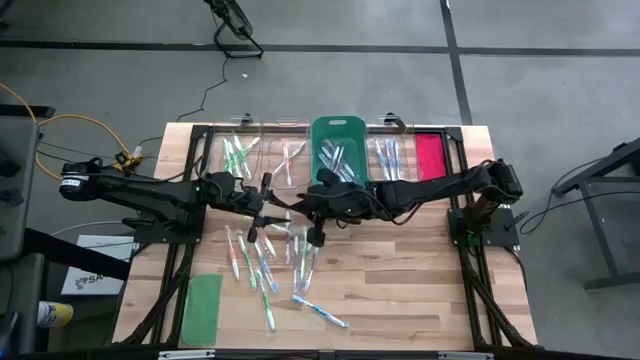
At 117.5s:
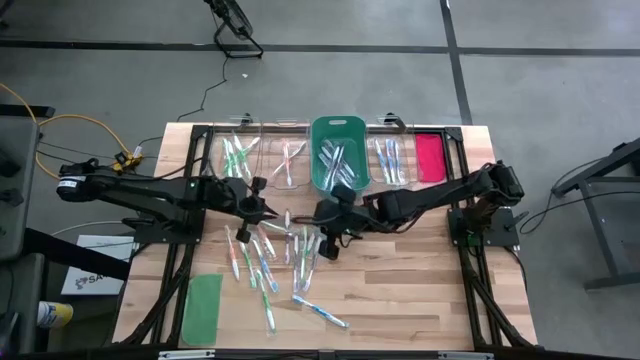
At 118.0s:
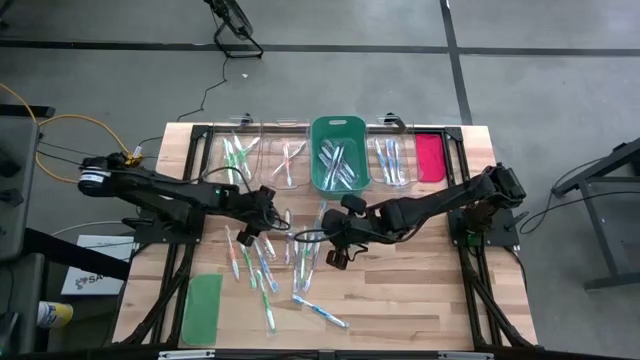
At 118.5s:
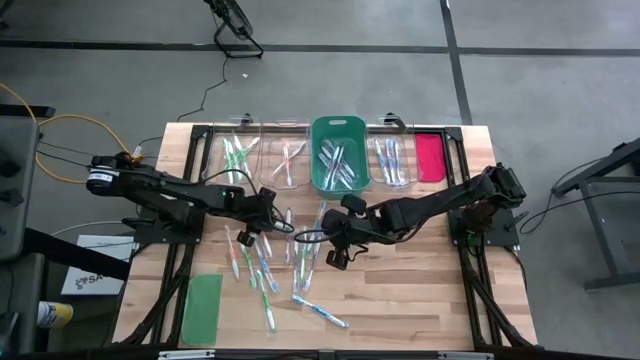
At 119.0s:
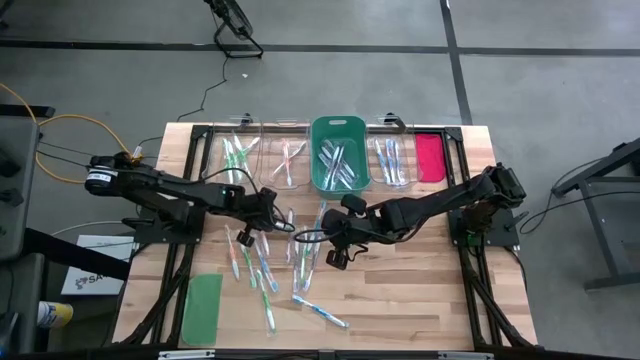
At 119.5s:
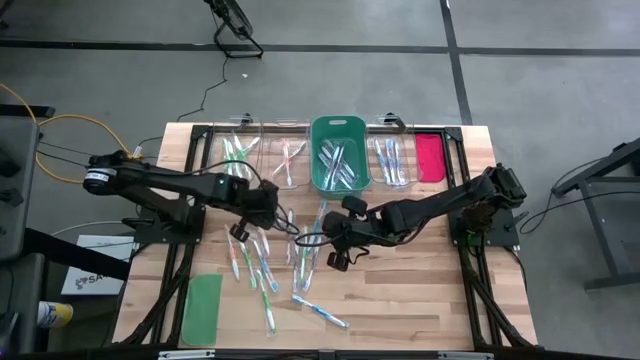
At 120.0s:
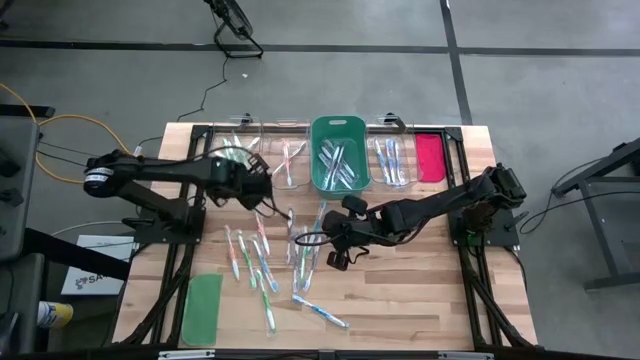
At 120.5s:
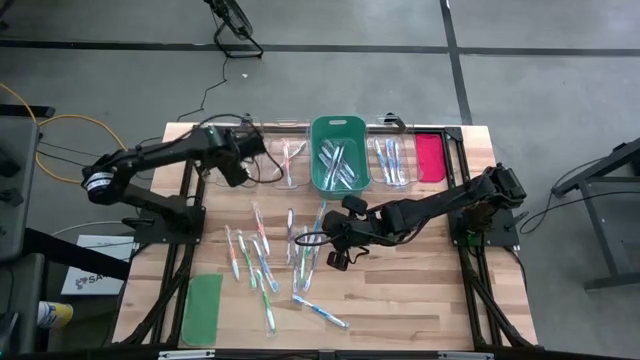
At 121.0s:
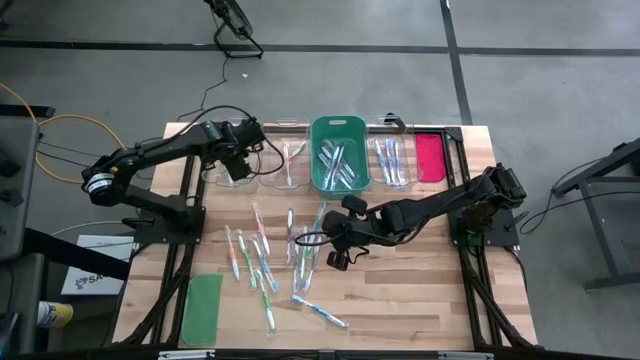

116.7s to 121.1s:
Task: Pick & Place Toothbrushes
Put the green toothbrush into the left transparent bin

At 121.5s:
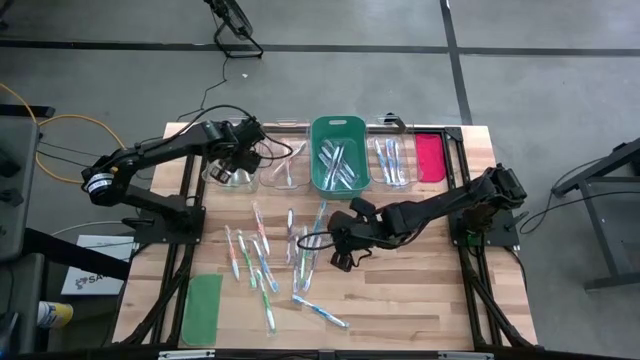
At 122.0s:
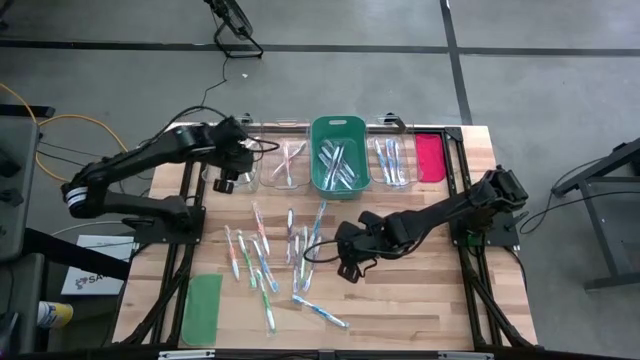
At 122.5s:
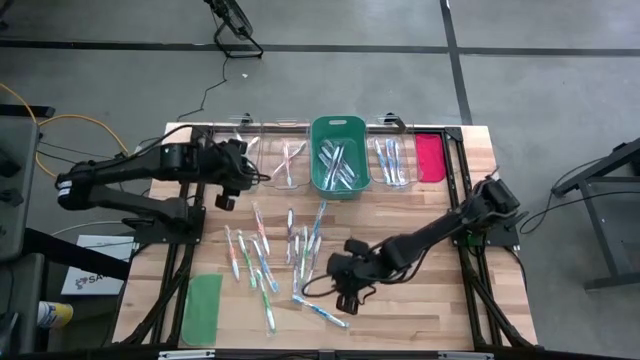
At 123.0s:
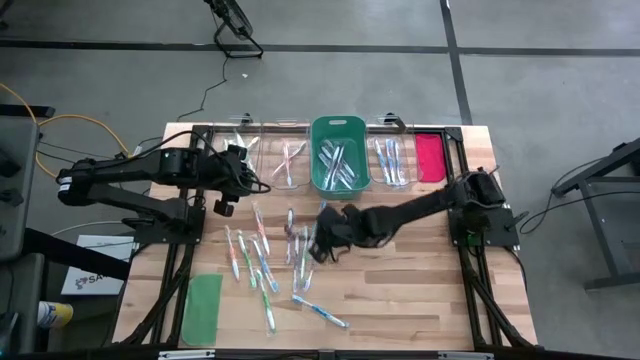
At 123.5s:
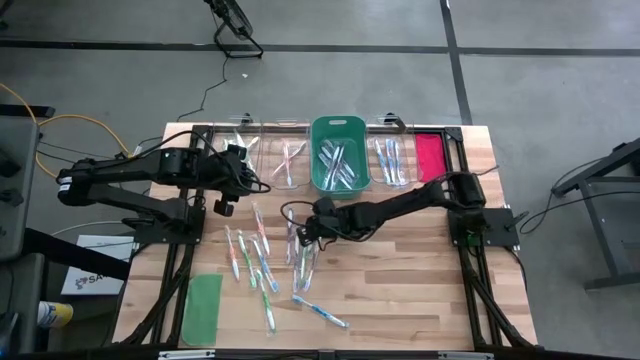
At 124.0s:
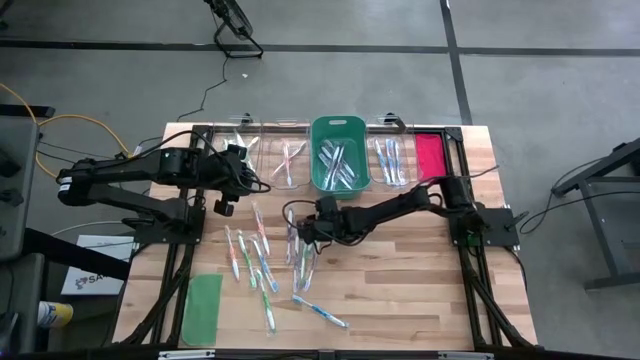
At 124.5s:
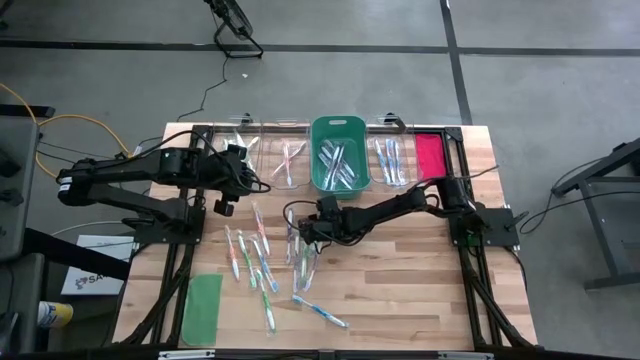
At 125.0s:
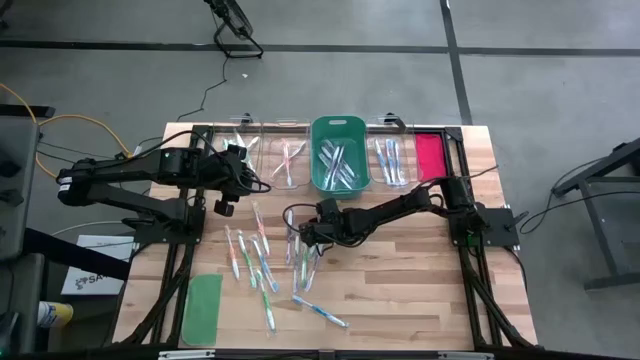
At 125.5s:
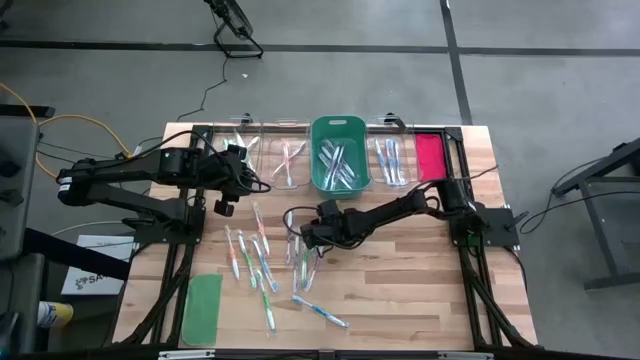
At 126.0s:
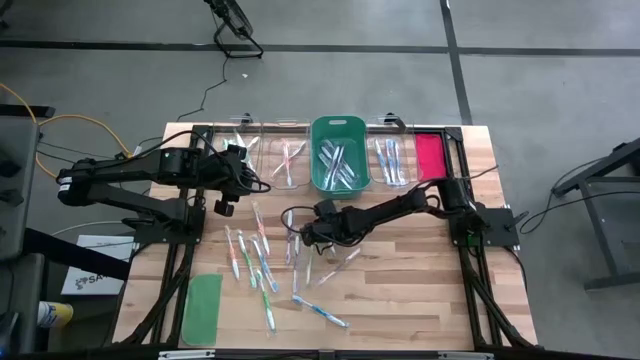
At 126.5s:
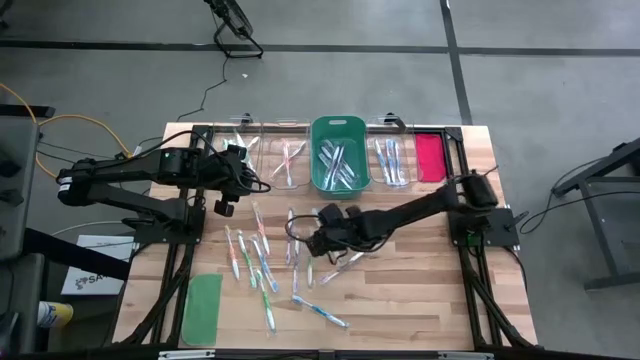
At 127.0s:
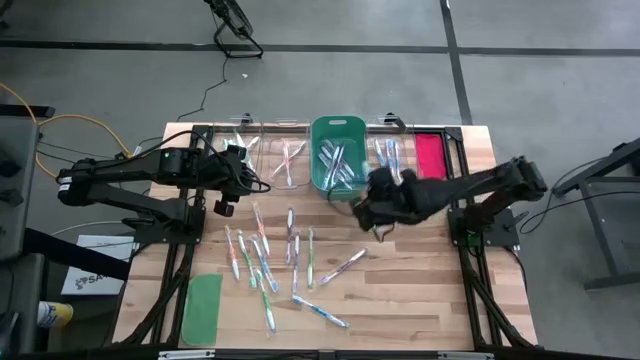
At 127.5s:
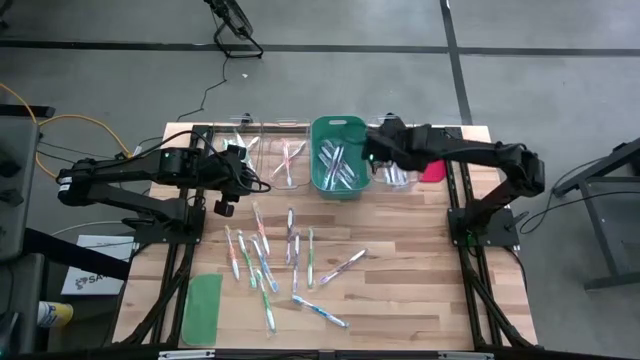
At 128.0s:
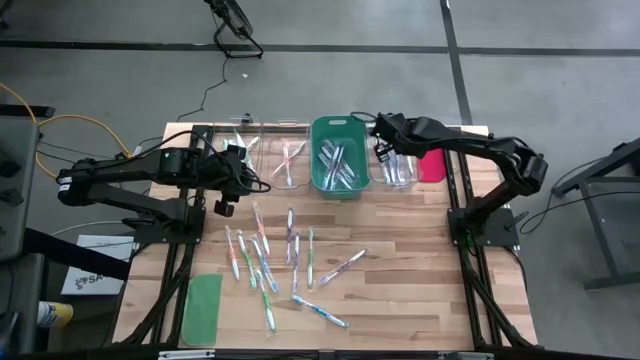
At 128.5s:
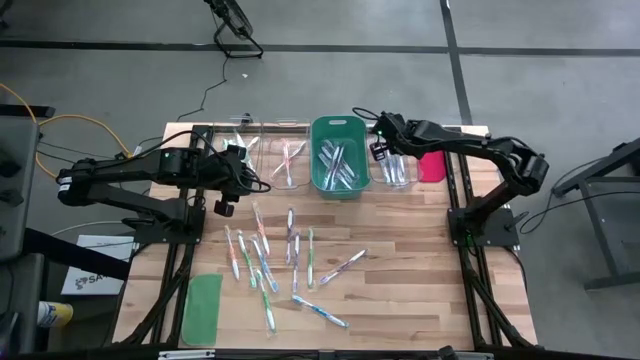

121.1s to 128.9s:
Put the blue toothbrush into the right transparent bin

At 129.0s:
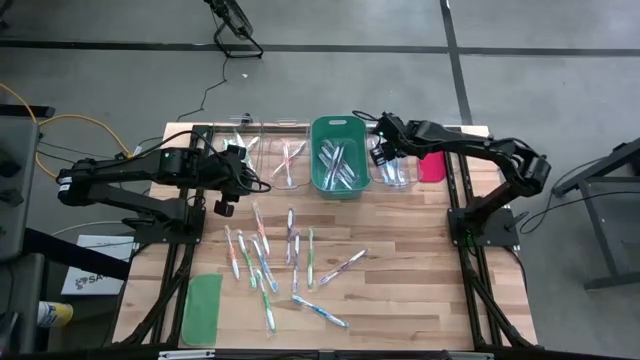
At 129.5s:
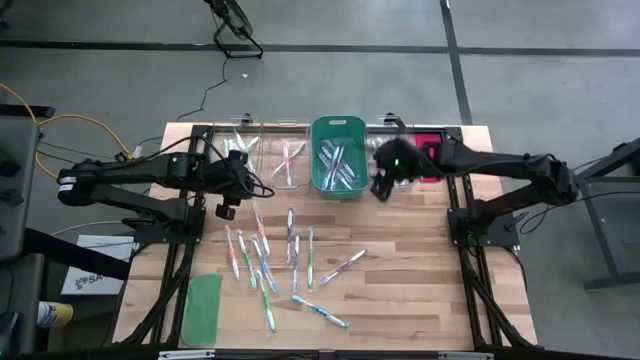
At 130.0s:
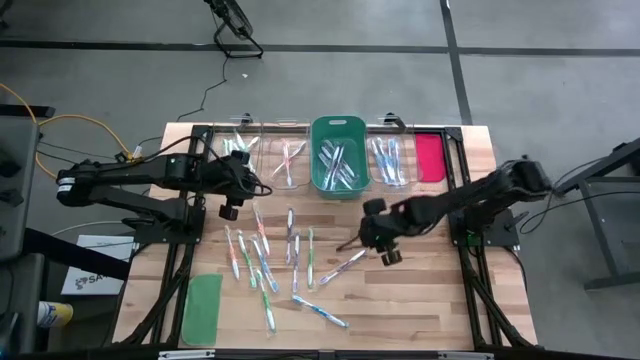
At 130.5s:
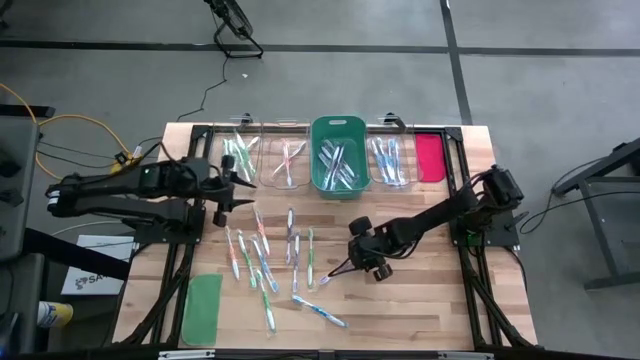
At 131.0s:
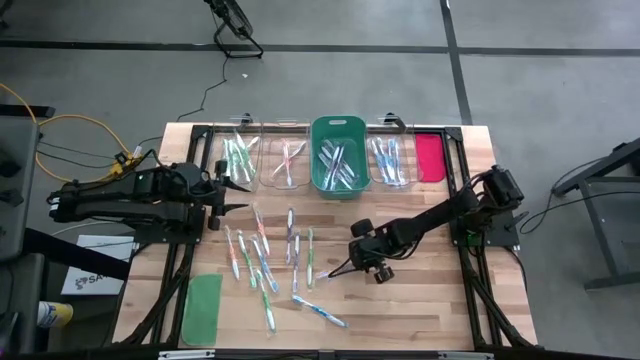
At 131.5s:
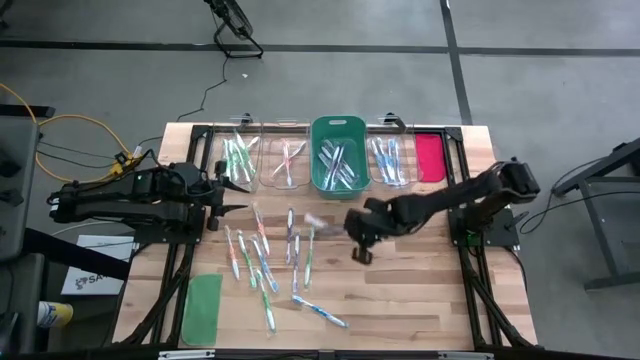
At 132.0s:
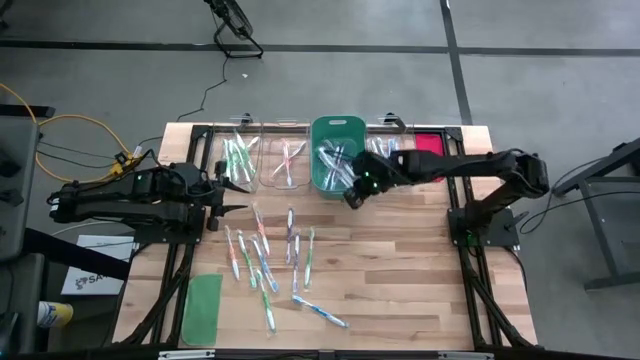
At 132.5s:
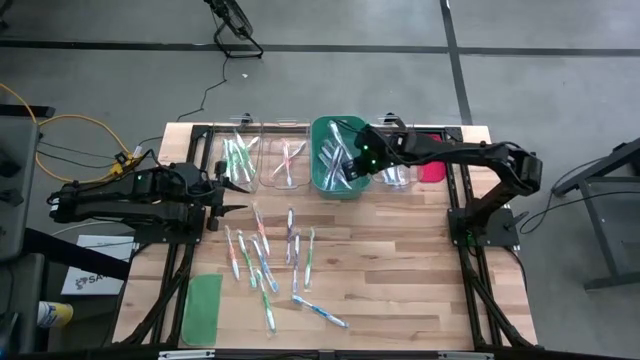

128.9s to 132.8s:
Put the purple toothbrush into the green bin

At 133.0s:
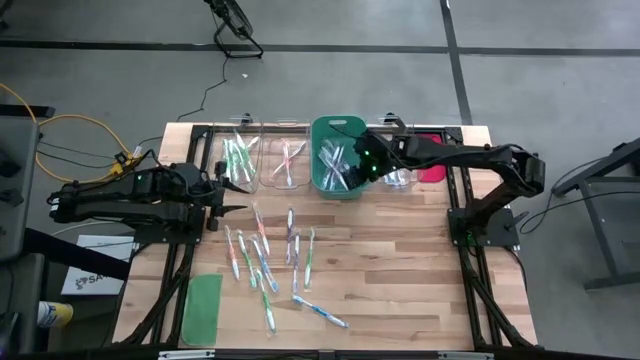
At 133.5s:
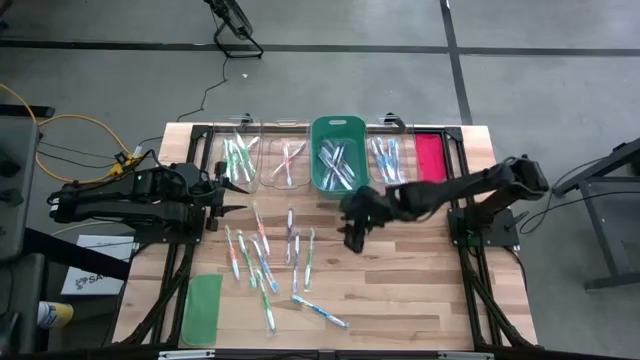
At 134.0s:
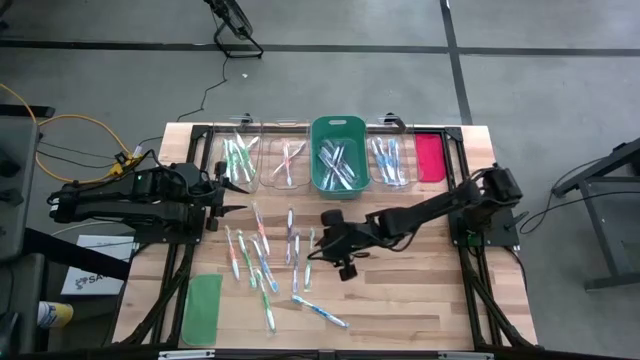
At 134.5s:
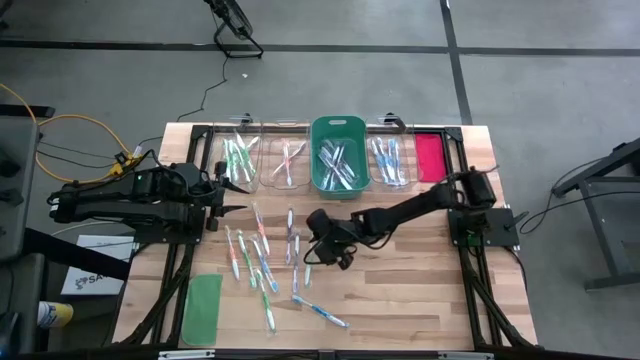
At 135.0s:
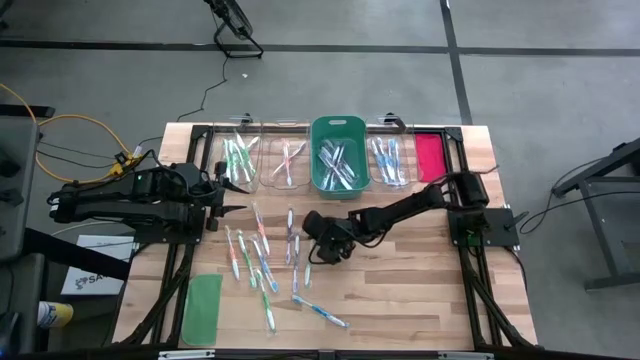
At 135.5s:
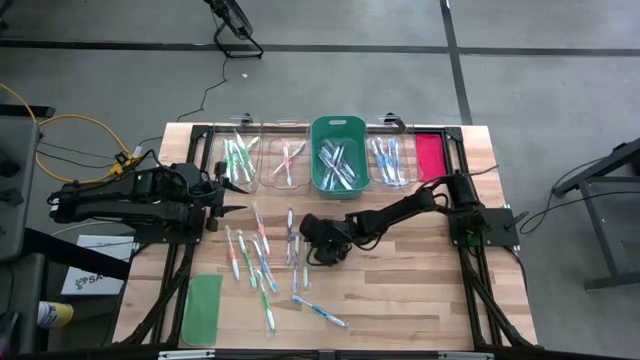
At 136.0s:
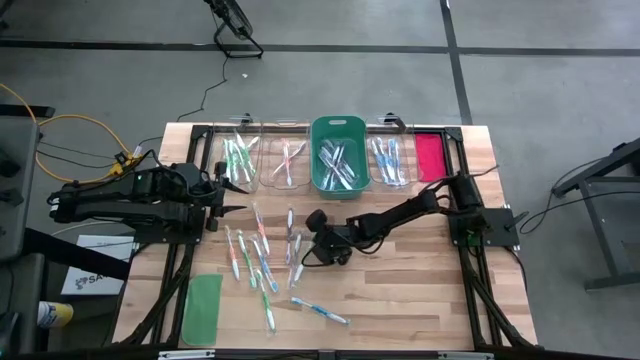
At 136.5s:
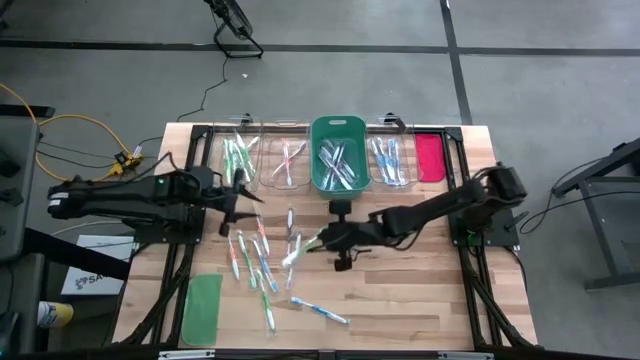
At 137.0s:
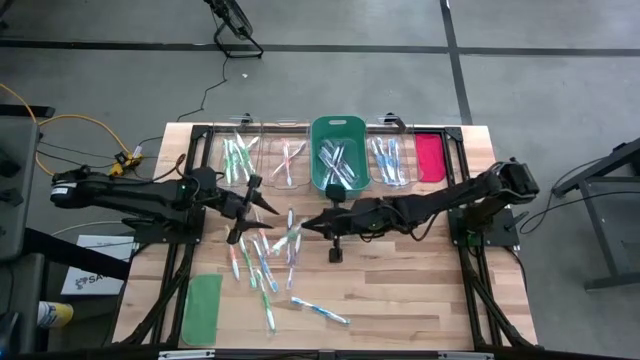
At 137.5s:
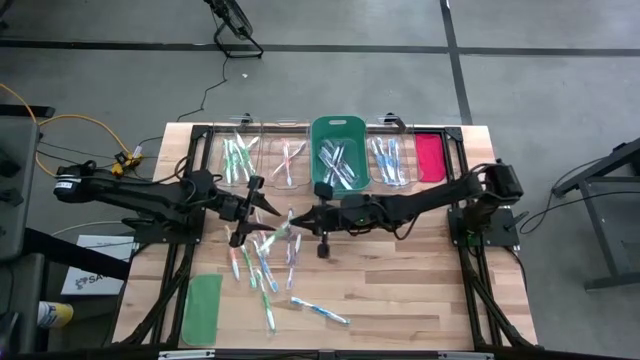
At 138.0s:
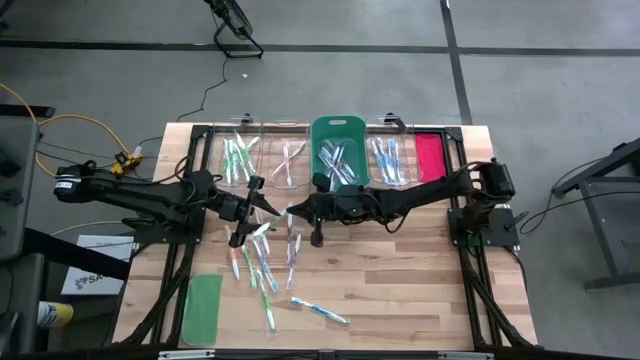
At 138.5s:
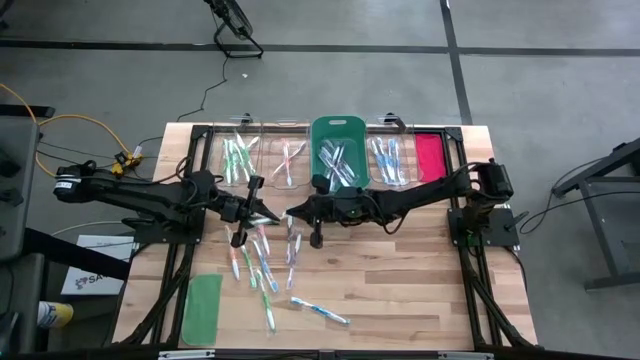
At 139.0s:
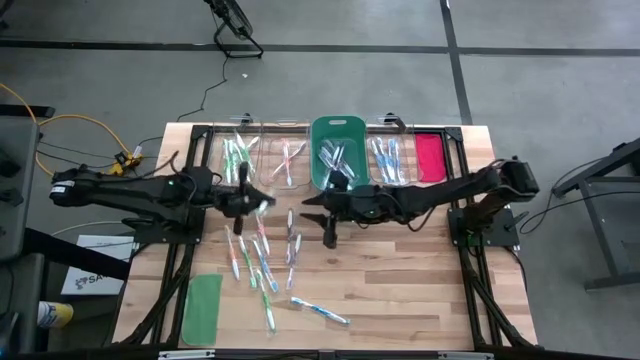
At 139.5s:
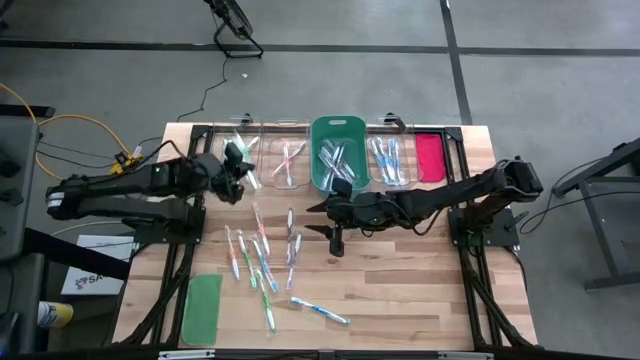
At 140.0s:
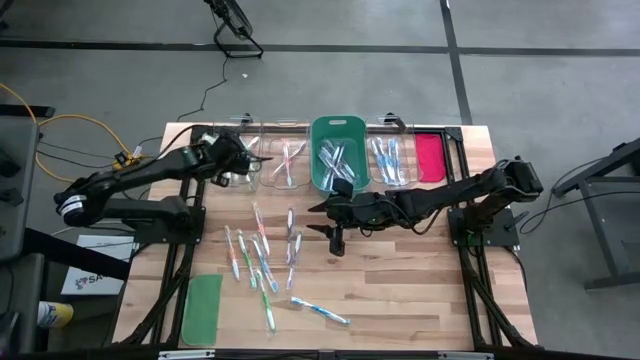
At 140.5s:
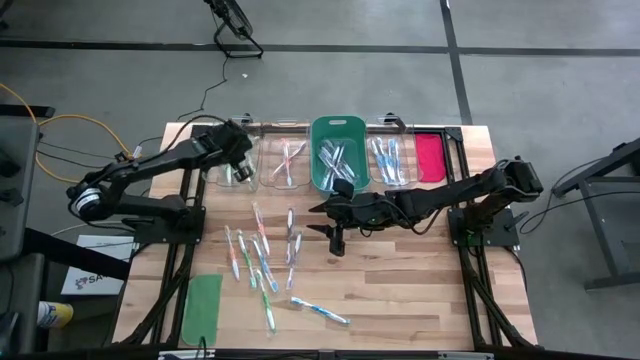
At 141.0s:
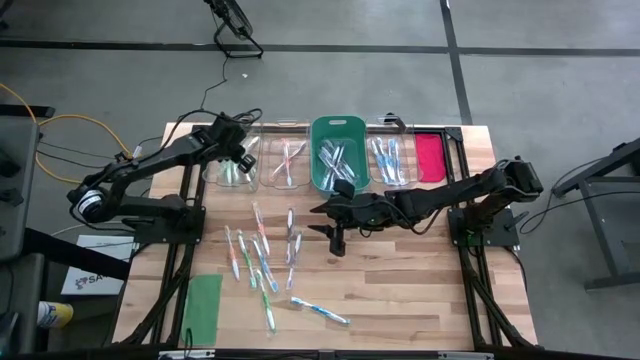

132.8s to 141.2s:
Put the green toothbrush into the left transparent bin
